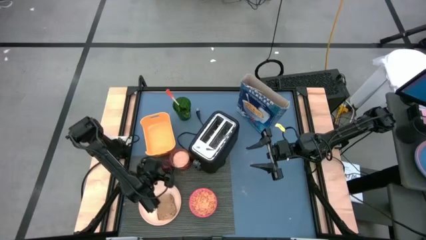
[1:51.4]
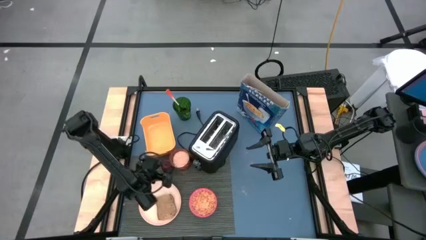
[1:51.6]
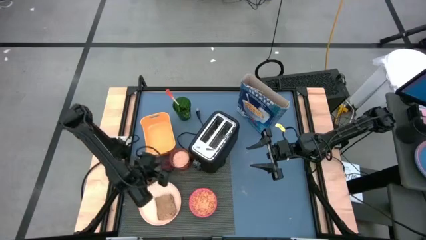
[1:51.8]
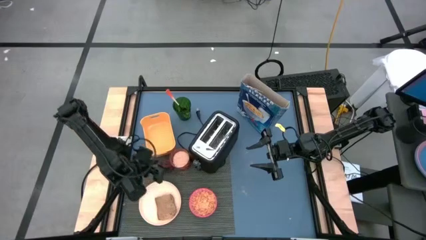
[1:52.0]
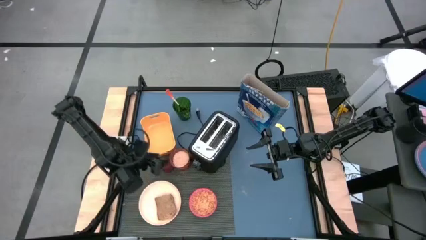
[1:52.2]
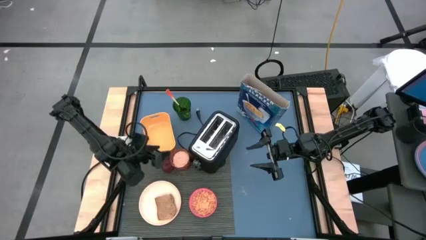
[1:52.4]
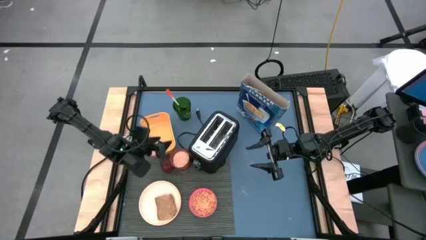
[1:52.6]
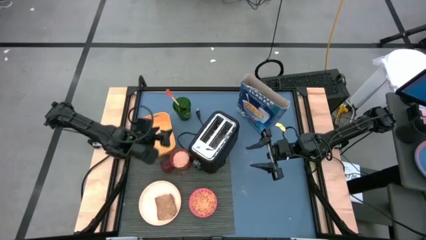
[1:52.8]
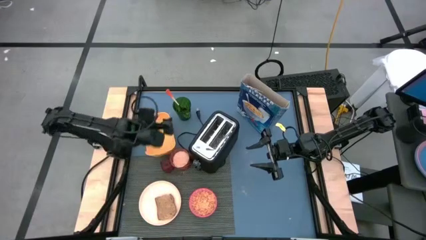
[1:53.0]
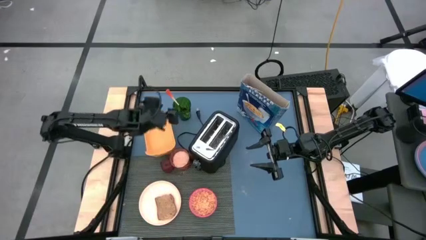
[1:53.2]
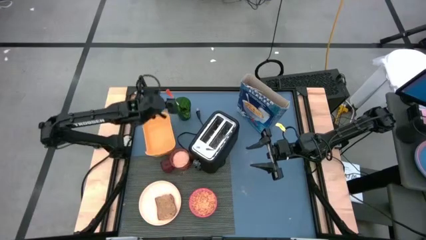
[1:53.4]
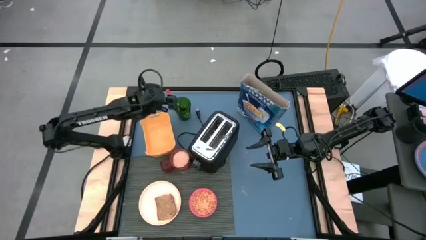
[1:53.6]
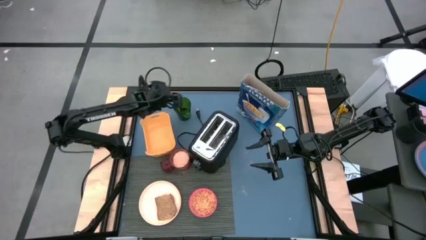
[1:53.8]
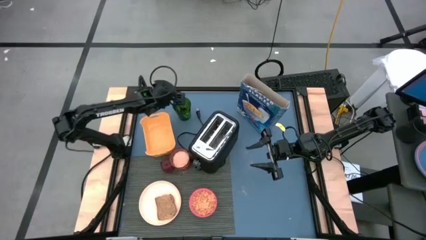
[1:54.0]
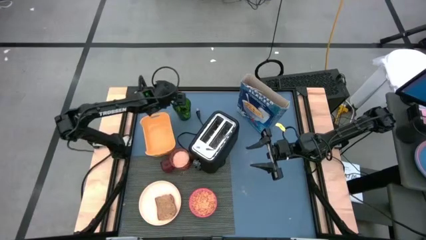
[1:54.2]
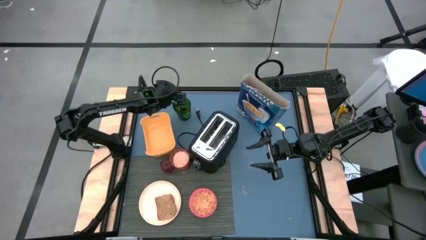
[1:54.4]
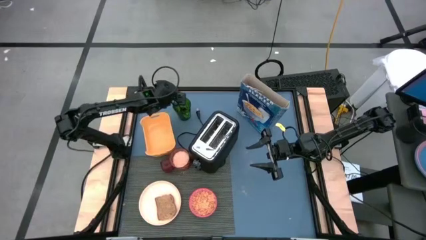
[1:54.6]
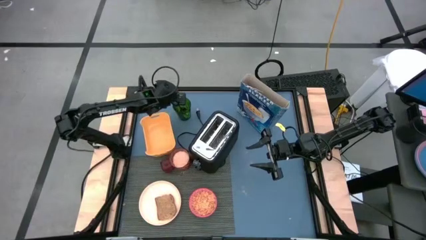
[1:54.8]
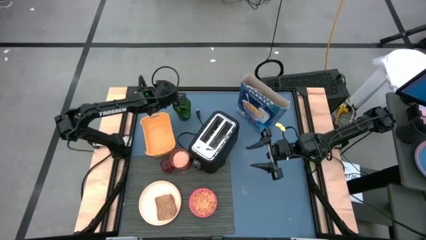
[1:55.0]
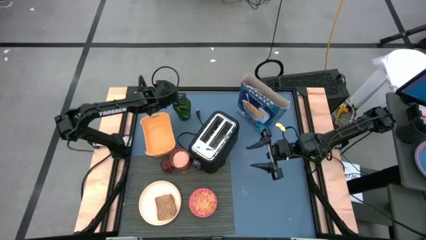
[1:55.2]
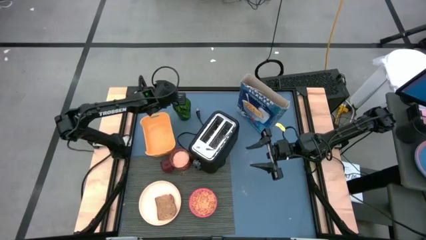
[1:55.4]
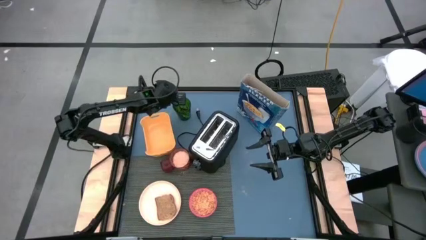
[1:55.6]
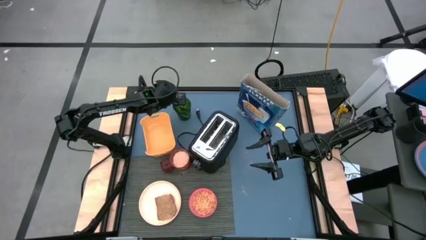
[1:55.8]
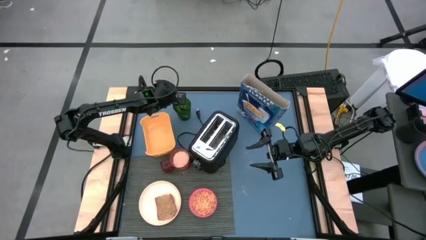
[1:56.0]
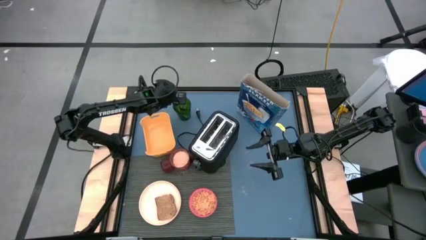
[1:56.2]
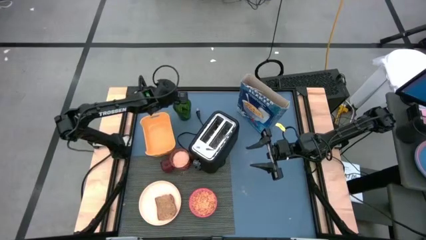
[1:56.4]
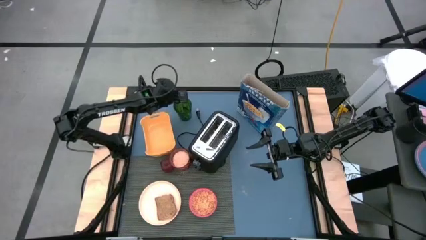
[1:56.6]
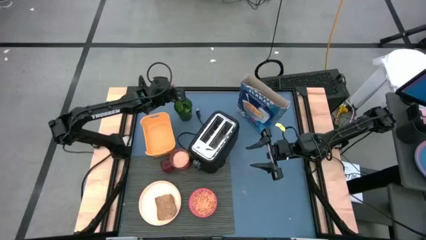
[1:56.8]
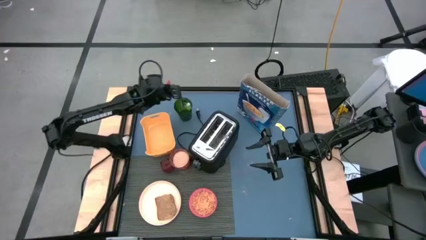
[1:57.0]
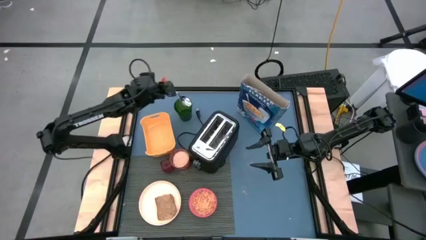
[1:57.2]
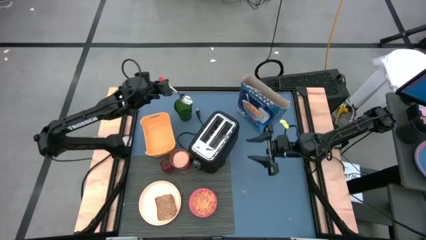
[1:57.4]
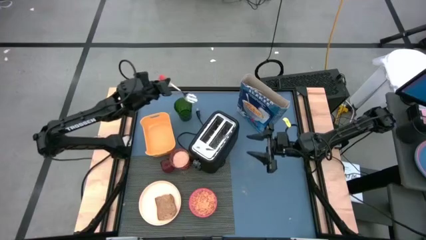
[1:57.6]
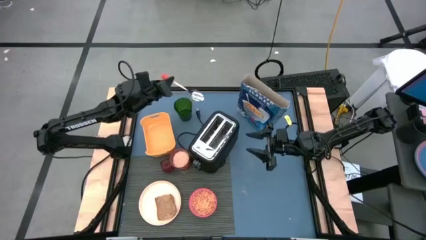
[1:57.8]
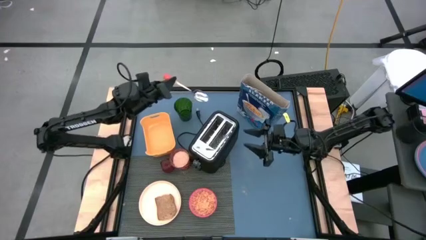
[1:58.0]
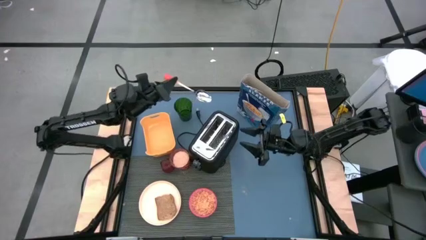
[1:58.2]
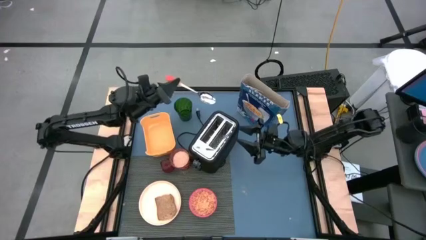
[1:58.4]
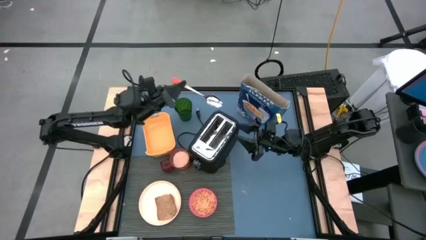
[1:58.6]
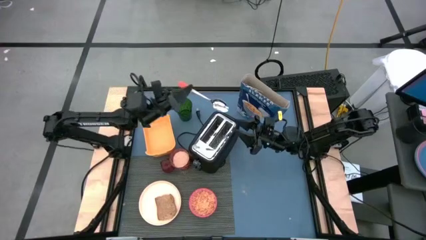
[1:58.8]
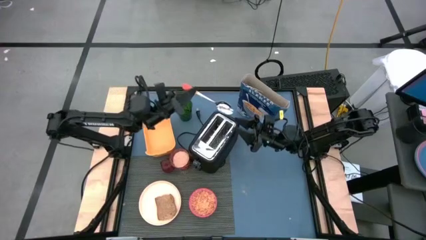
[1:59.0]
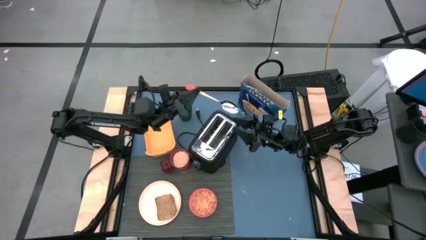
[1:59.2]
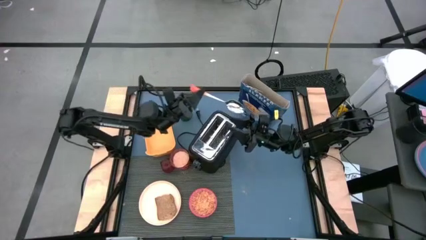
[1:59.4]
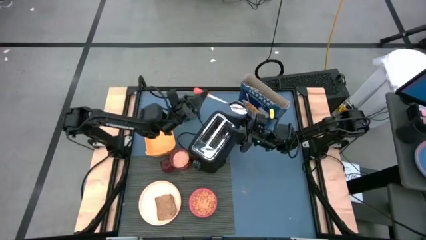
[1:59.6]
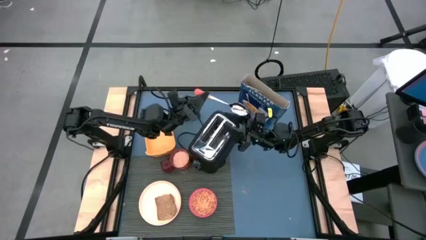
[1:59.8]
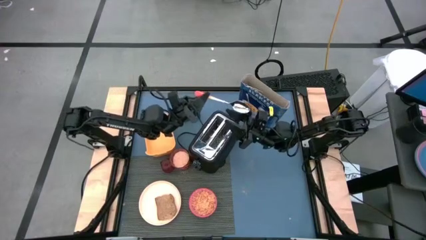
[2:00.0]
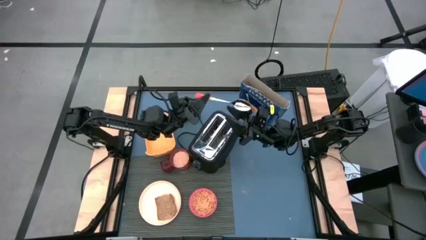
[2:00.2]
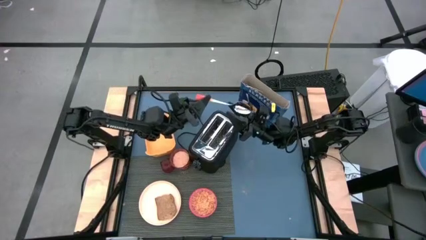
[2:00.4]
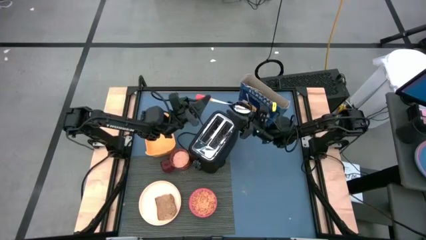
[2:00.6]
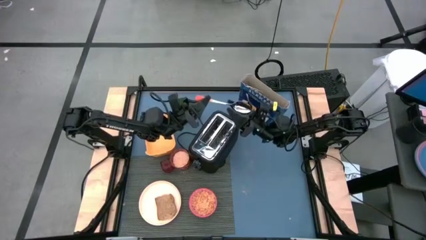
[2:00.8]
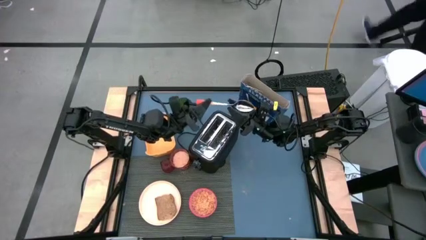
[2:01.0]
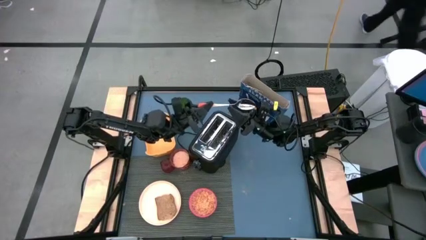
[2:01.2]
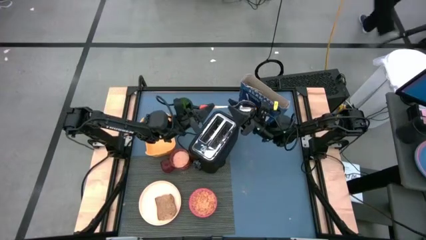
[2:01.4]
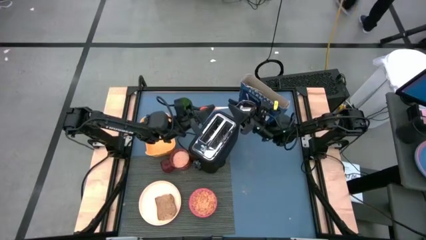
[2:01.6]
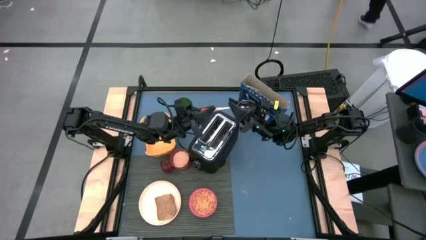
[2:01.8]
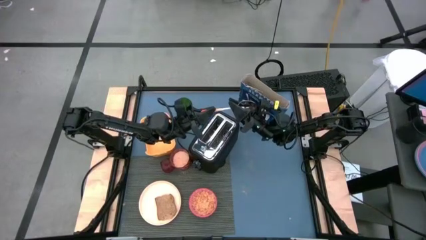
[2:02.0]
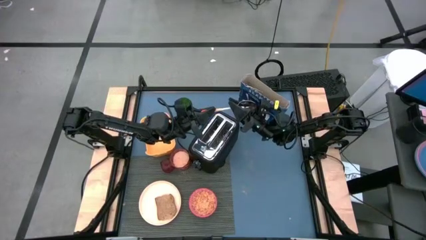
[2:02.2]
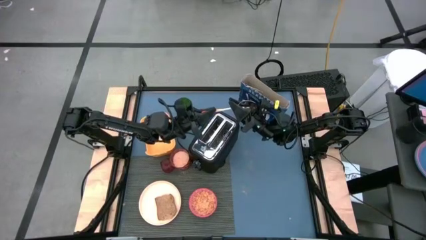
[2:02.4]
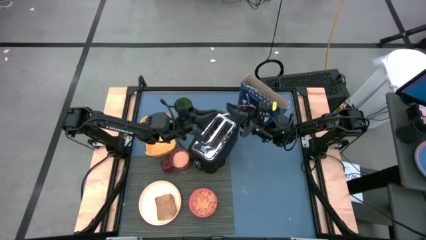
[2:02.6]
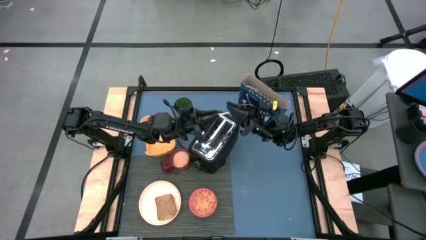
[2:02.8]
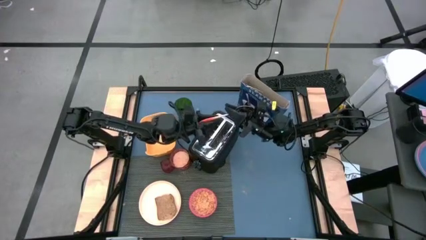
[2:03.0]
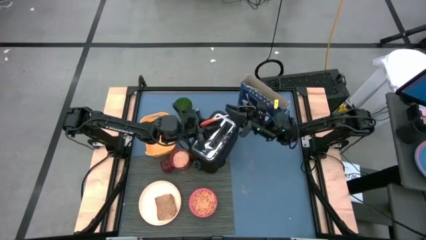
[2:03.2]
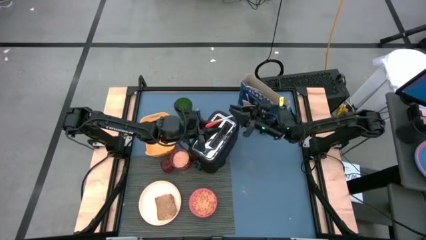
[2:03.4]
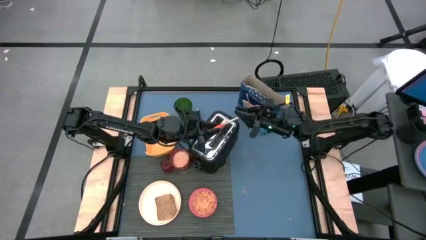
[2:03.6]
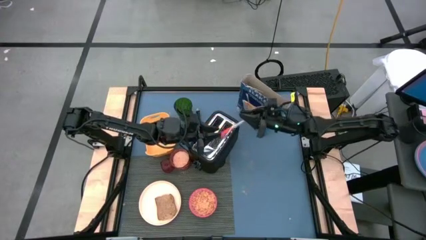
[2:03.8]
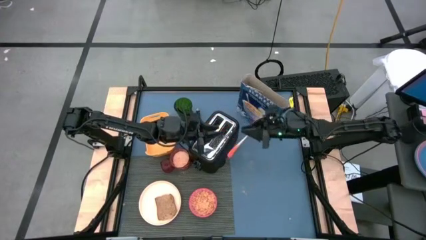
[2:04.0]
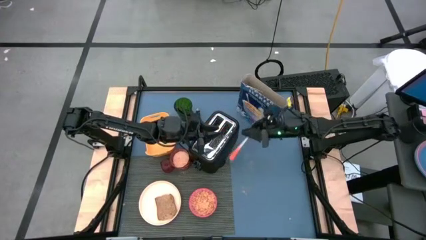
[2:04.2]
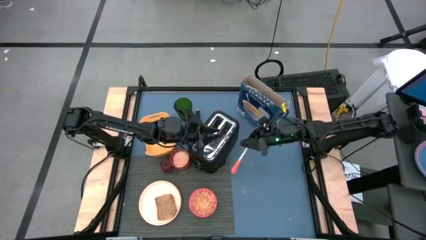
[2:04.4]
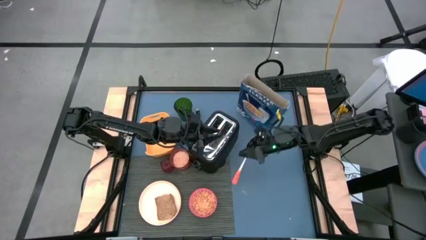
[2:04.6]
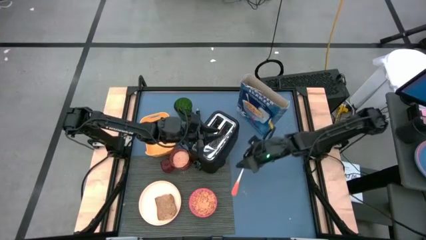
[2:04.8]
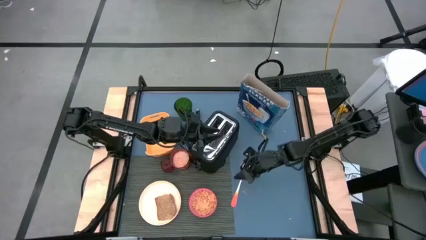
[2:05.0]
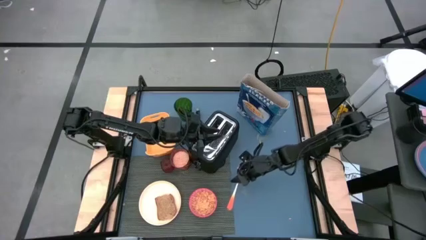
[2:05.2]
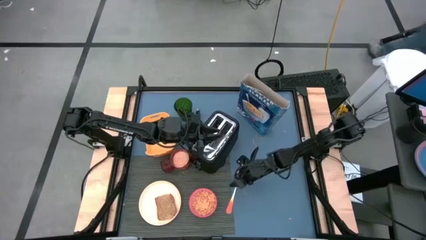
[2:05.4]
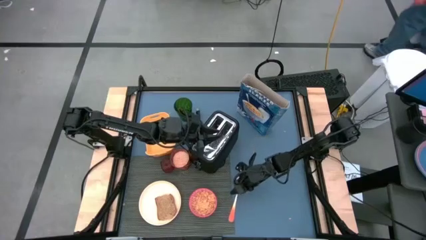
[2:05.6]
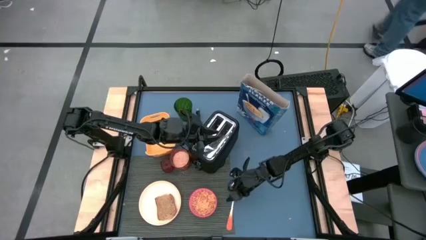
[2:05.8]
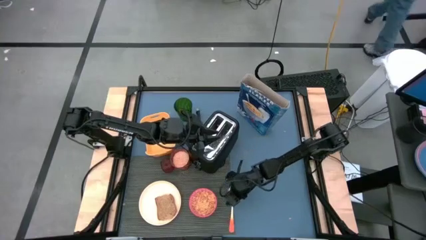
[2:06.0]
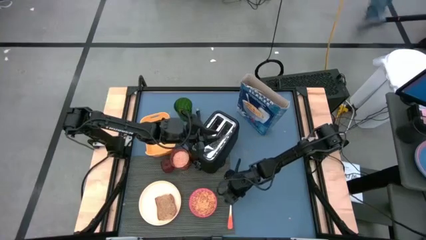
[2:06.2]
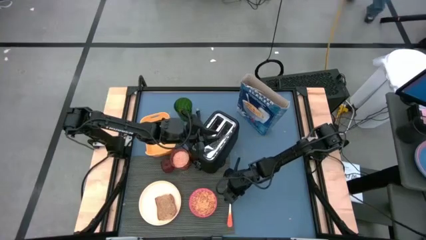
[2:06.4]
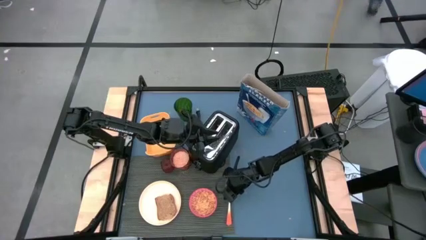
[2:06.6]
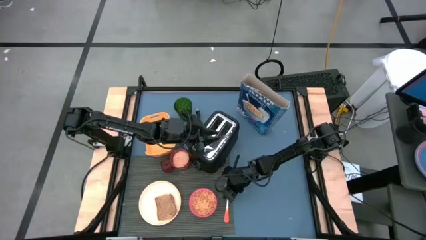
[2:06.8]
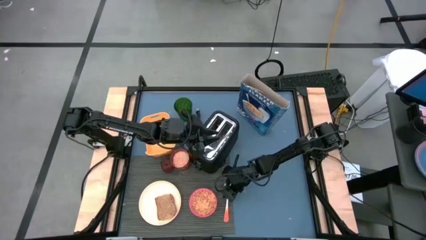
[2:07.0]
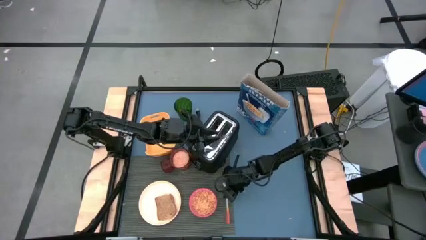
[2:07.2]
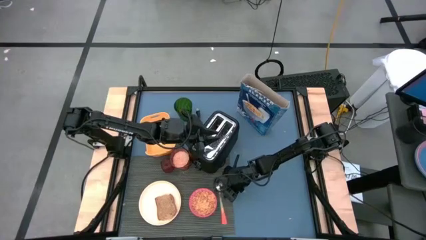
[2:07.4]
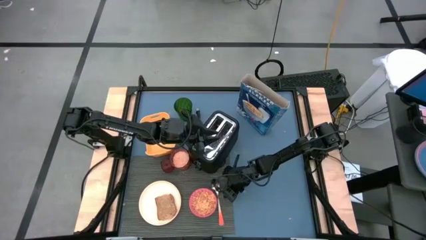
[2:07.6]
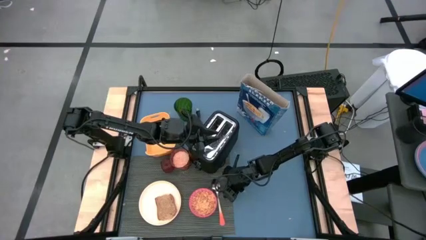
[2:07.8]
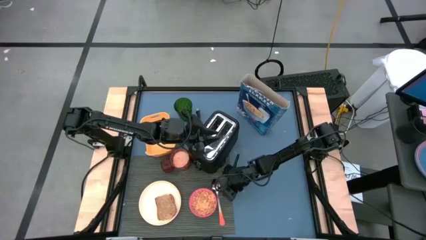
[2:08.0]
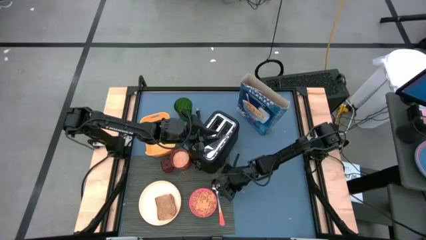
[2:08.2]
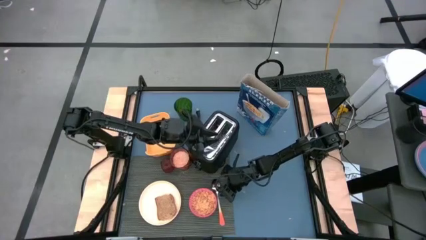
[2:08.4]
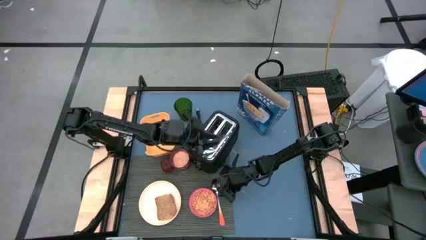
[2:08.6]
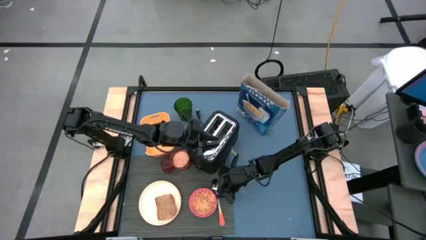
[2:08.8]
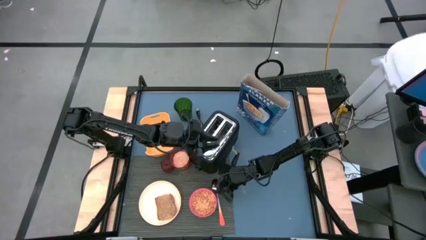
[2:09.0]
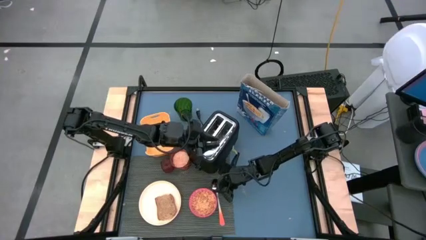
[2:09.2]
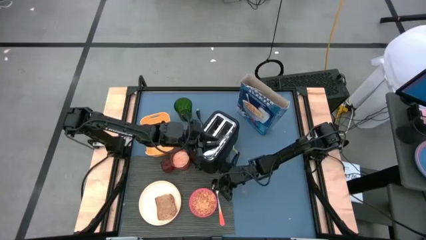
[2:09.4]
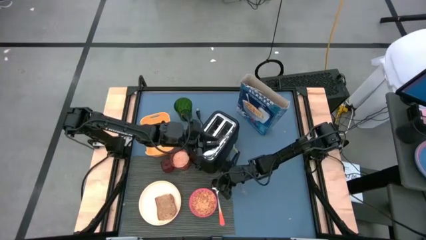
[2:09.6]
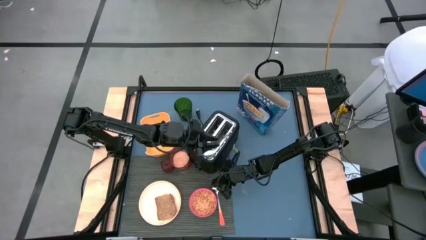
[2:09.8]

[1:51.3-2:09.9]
Task: Arrange a breakfast setting
Put the orange fork to the gray tablemat to the right of the red bowl
